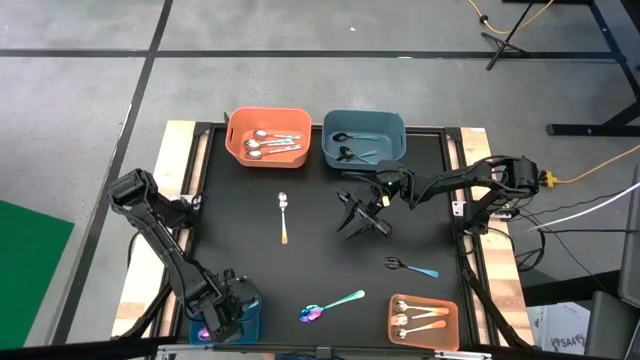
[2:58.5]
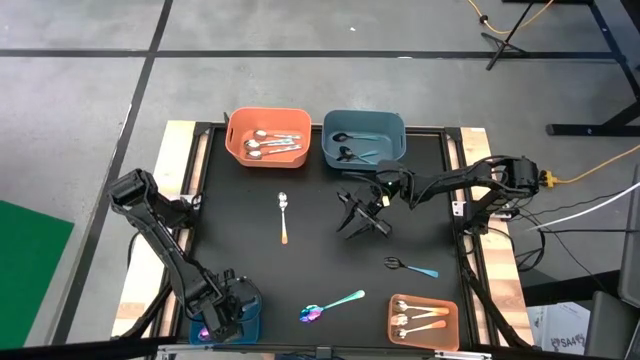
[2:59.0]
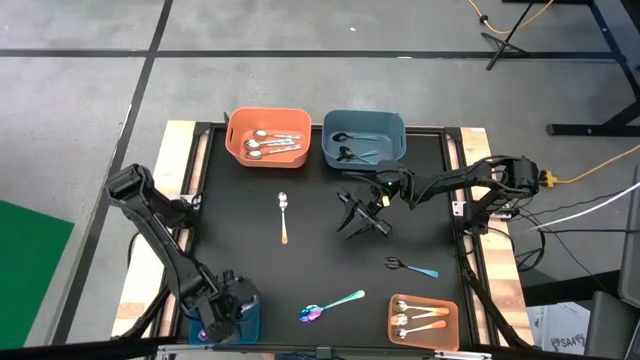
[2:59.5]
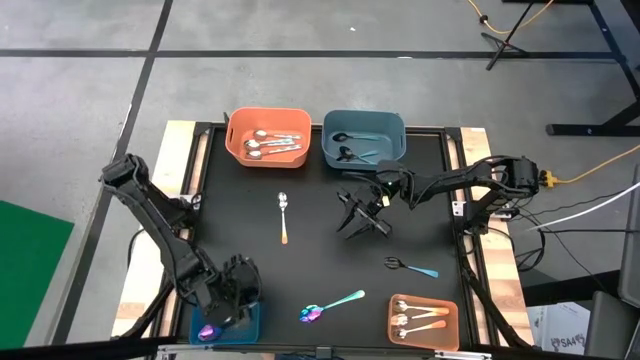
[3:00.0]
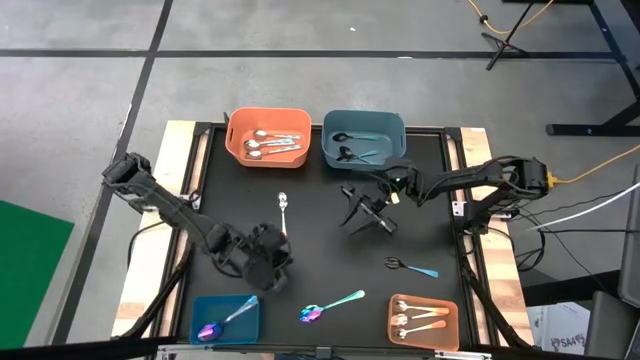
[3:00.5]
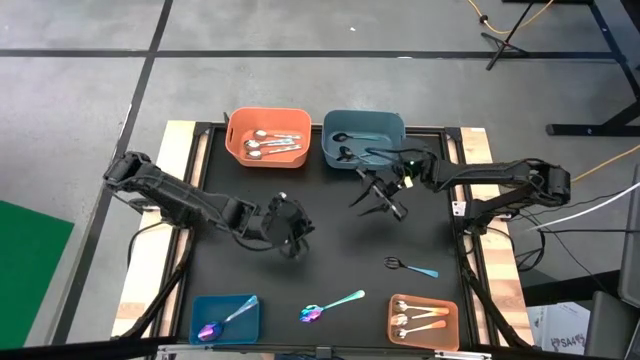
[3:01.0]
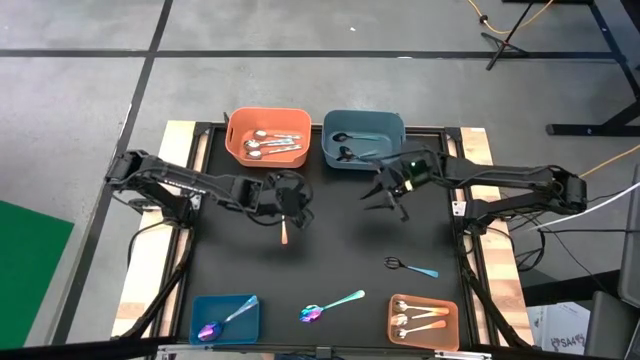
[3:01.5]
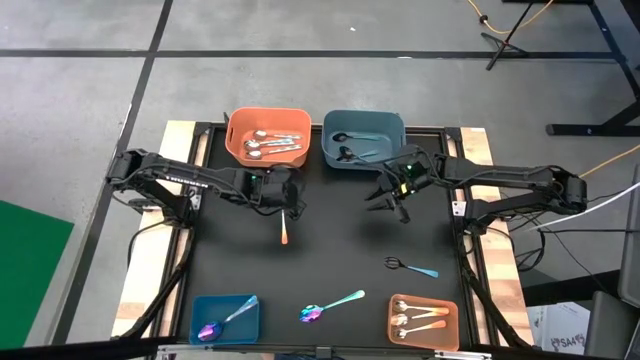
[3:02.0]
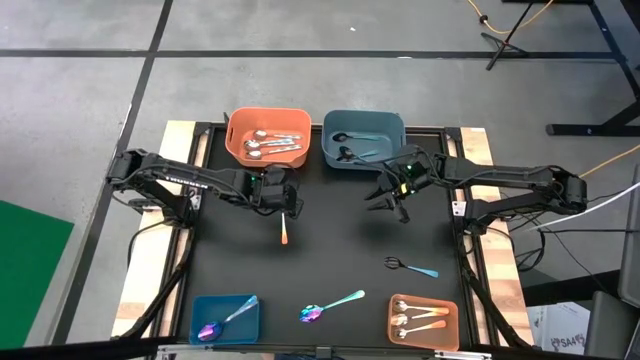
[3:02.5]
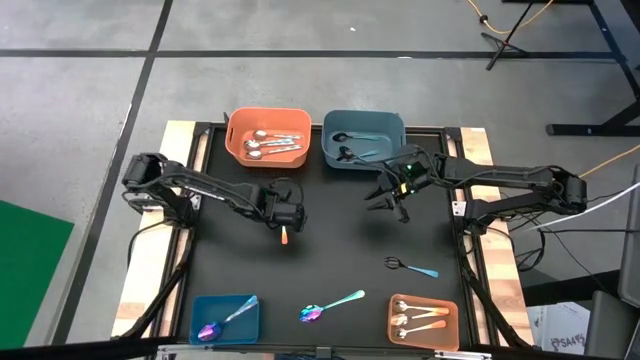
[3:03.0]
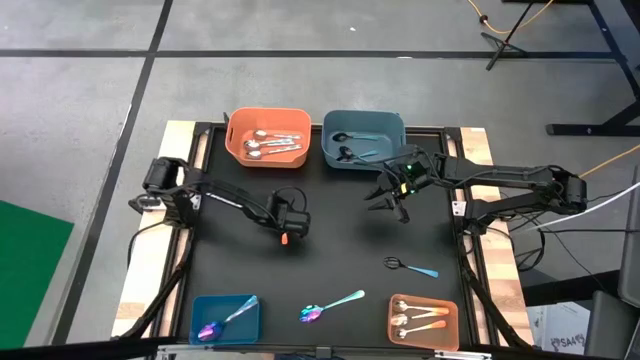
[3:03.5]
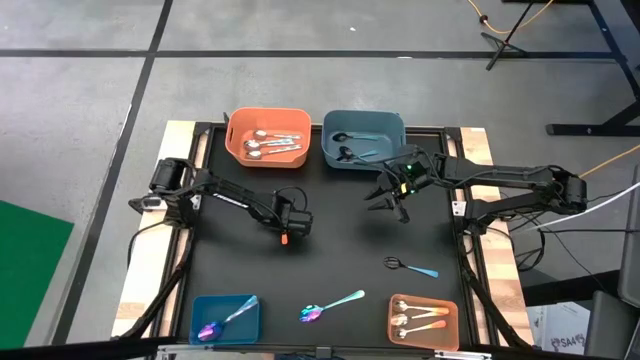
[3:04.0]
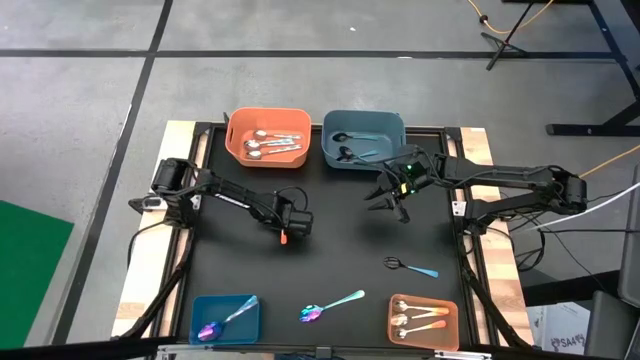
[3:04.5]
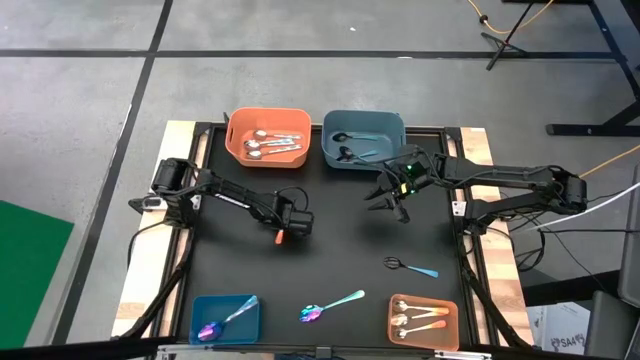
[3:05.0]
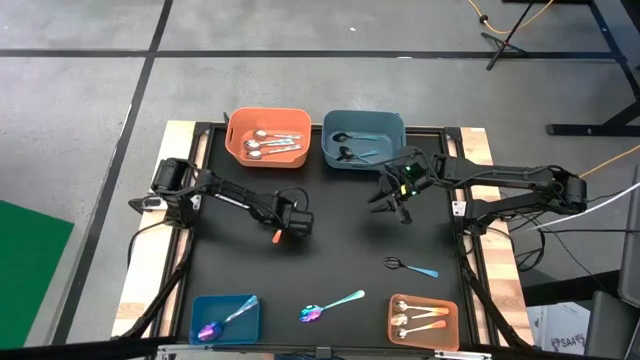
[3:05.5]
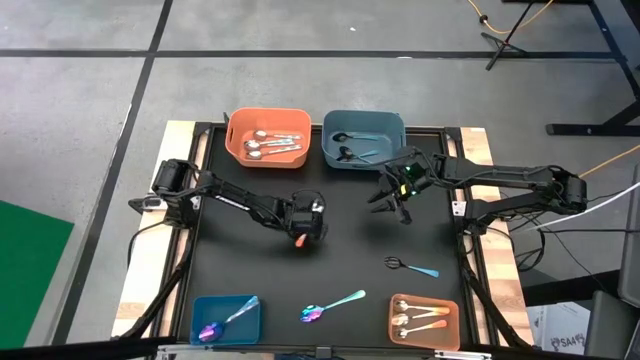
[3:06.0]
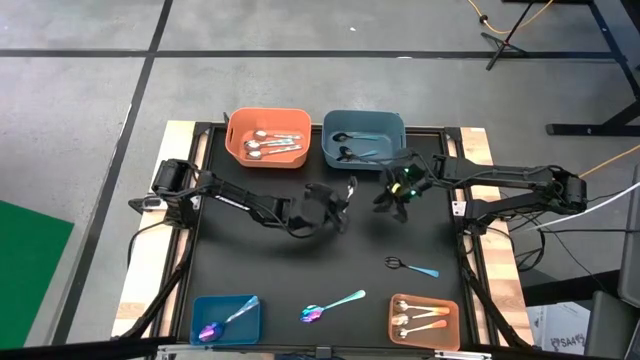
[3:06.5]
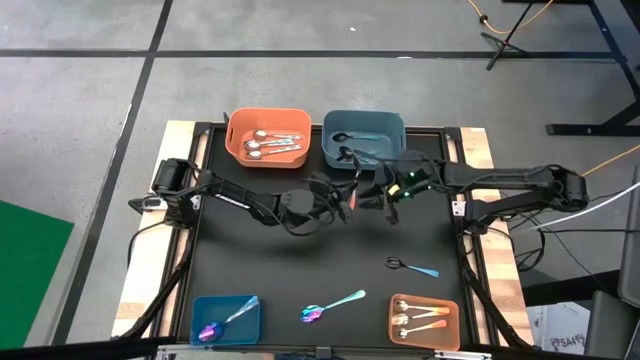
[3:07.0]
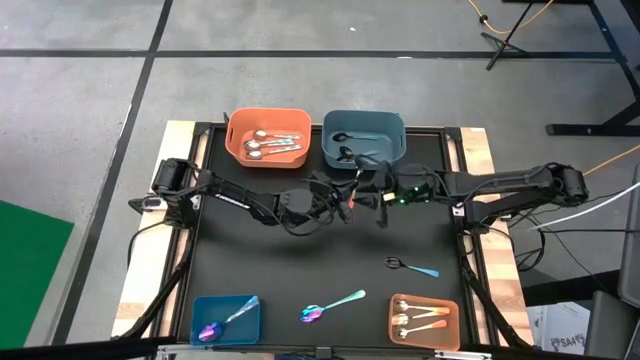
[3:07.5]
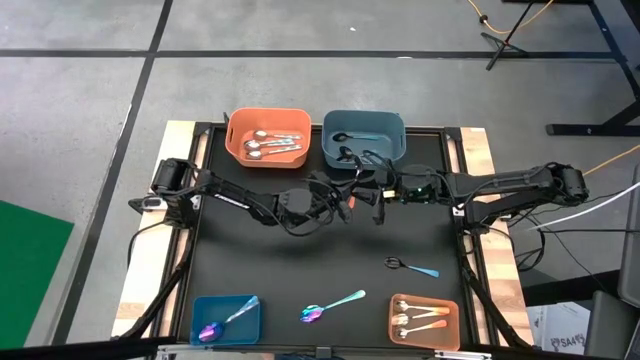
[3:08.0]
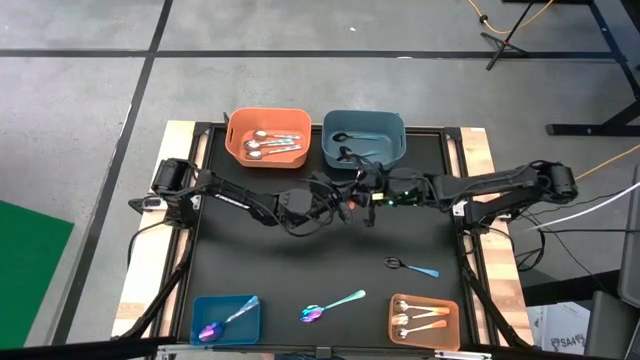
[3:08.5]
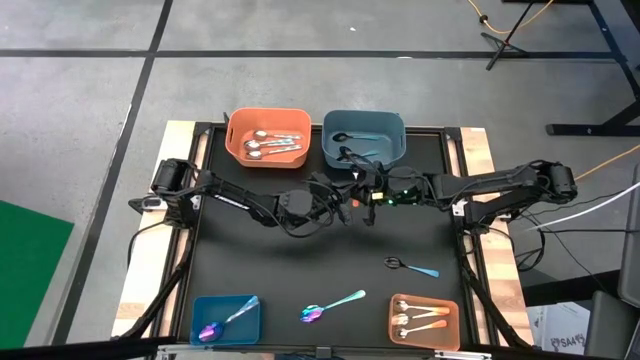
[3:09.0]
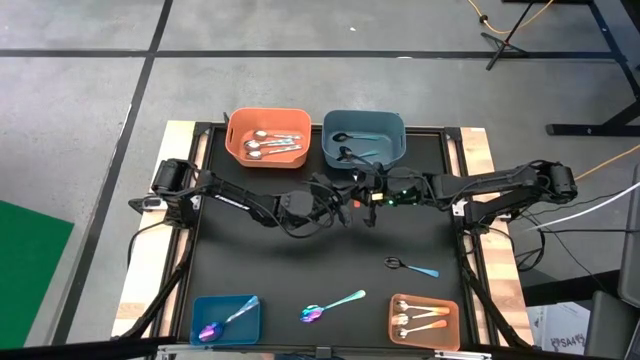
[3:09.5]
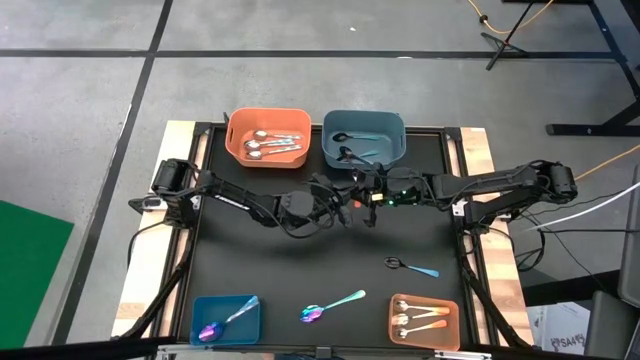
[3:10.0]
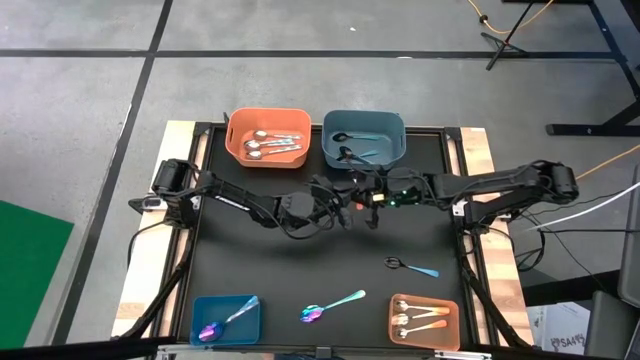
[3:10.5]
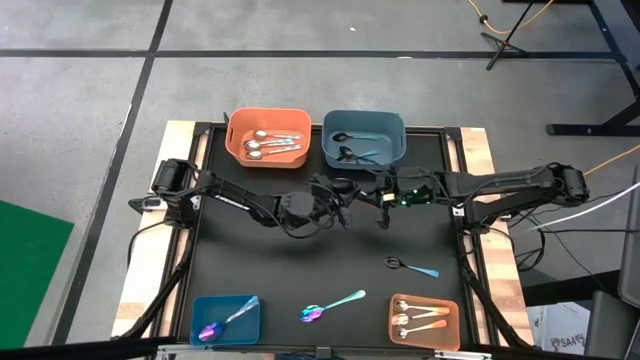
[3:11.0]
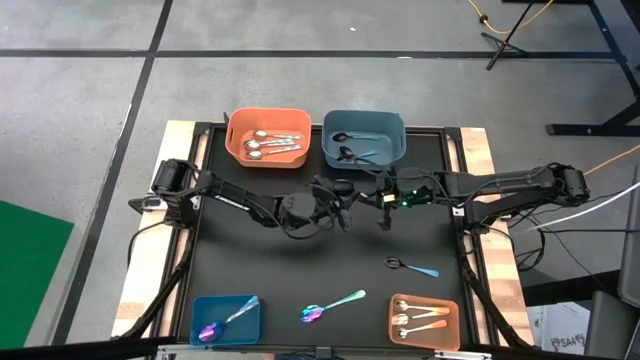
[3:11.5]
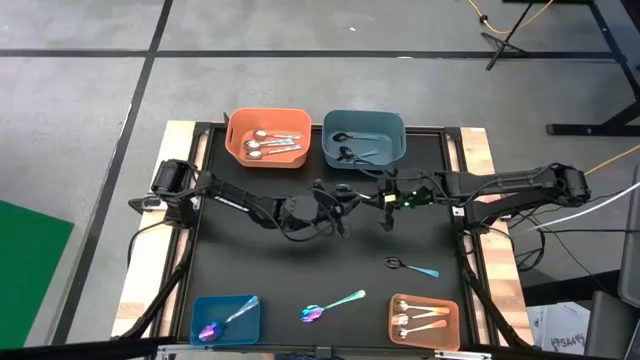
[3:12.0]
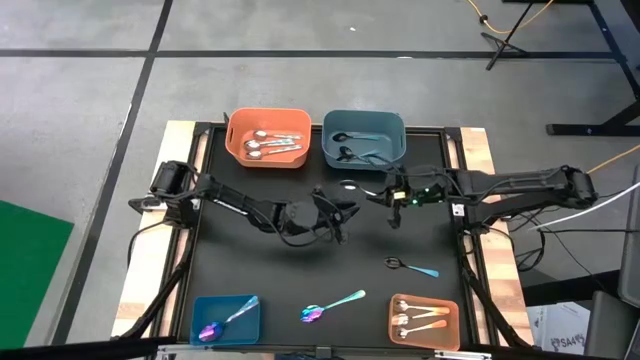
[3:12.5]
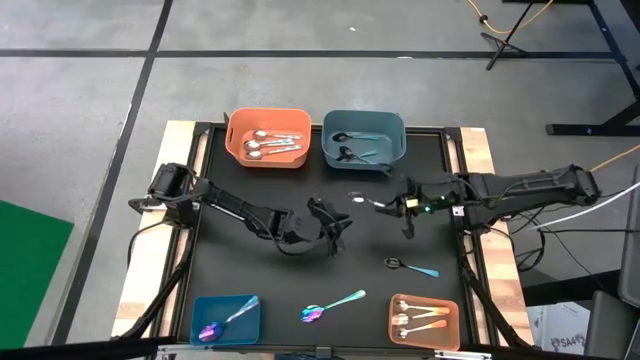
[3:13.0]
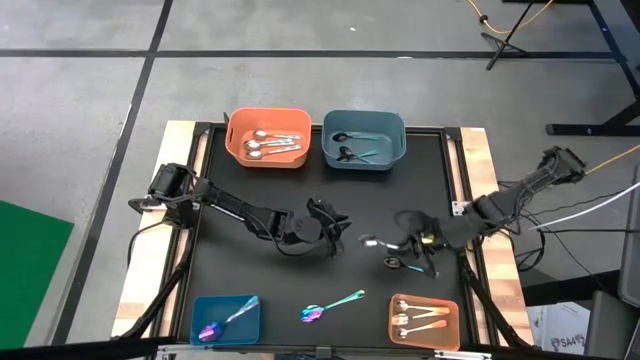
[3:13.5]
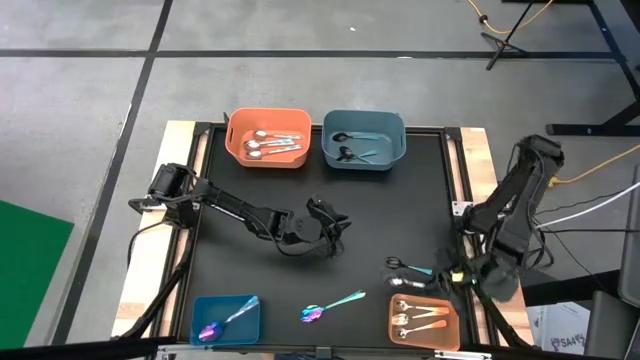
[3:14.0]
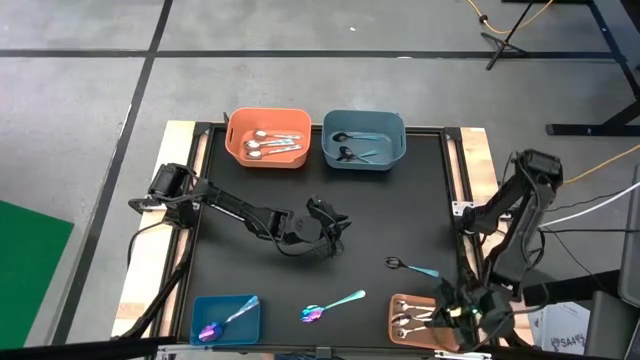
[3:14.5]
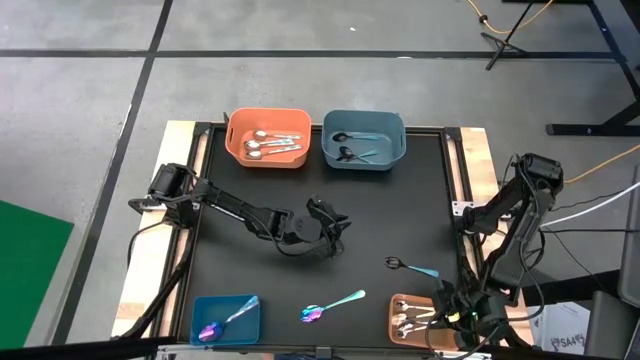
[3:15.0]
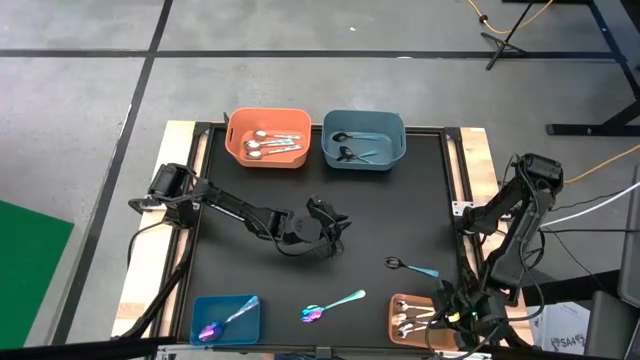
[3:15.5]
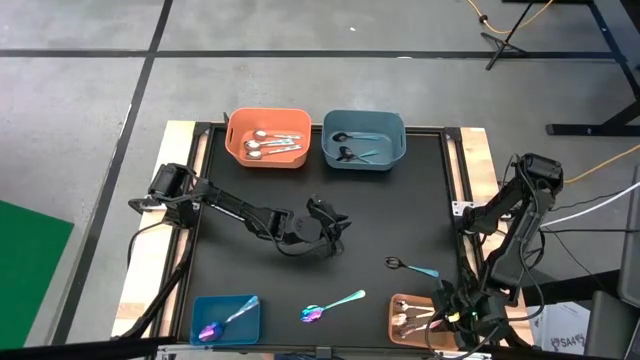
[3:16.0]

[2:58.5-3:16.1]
Task: Sort silverware by color (type)
Put the orange spoon into the bottom orange bin

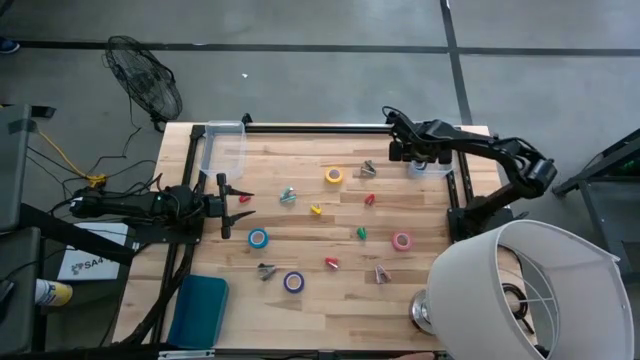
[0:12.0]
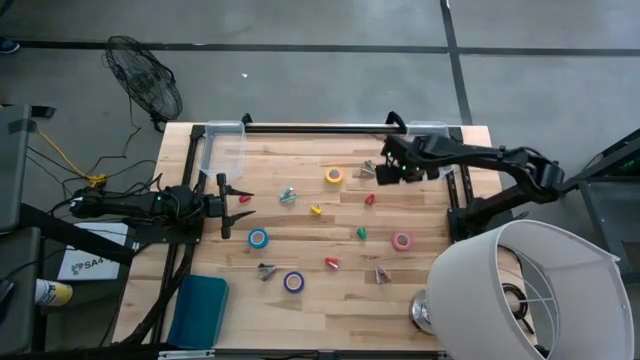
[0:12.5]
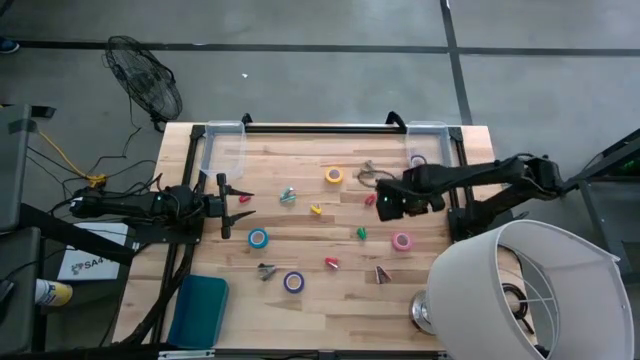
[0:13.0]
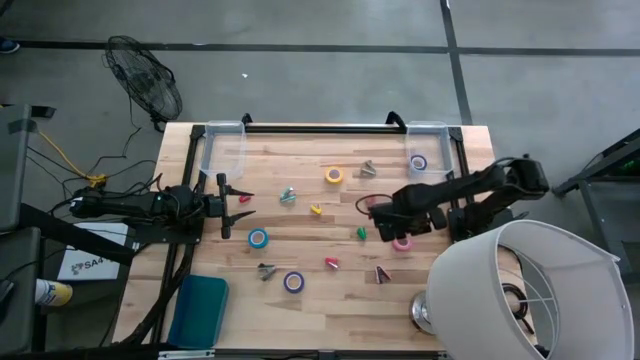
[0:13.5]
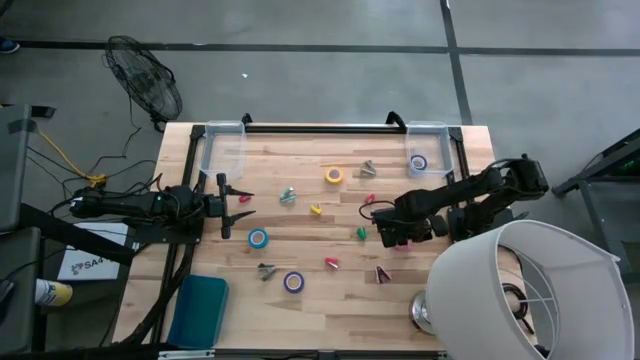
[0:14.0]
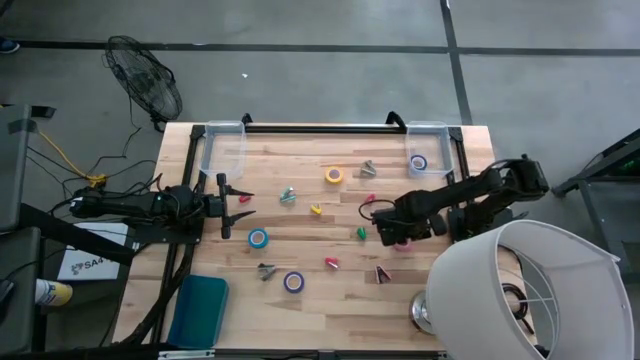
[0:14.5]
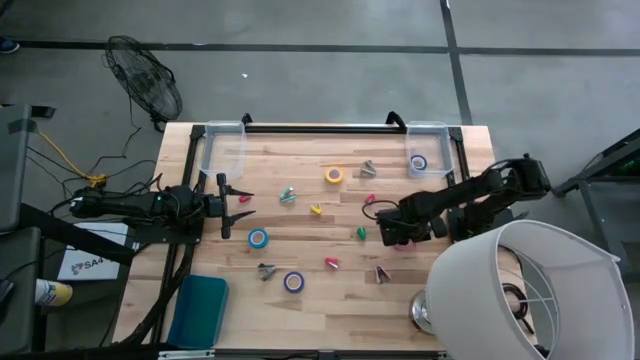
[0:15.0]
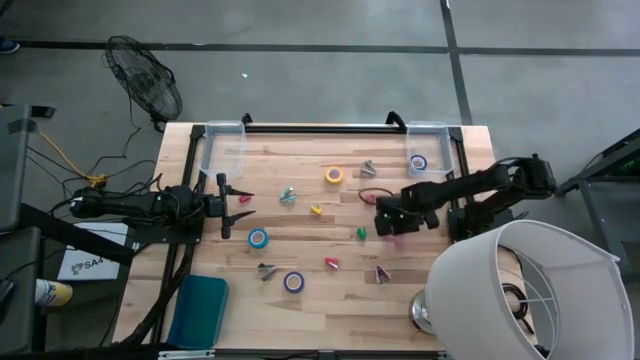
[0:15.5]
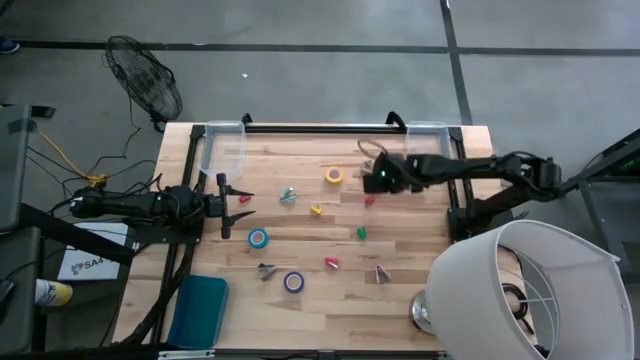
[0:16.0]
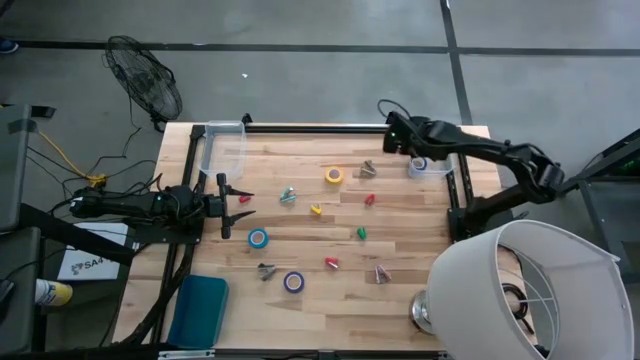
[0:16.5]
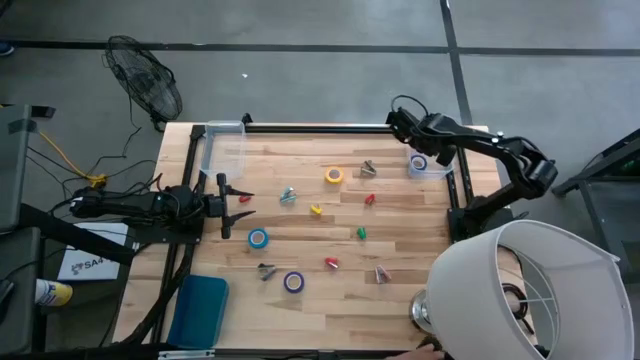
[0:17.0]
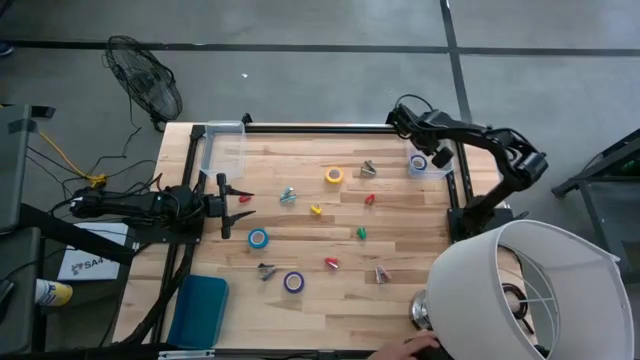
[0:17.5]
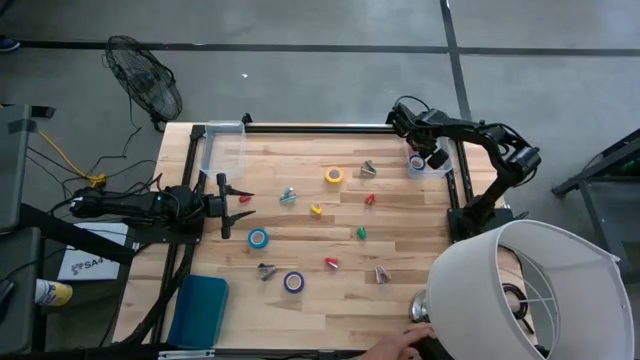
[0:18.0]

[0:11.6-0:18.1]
Task: Pick and place Stapler, Stapler remover, tape
Put the pink tape into the right transparent bin
